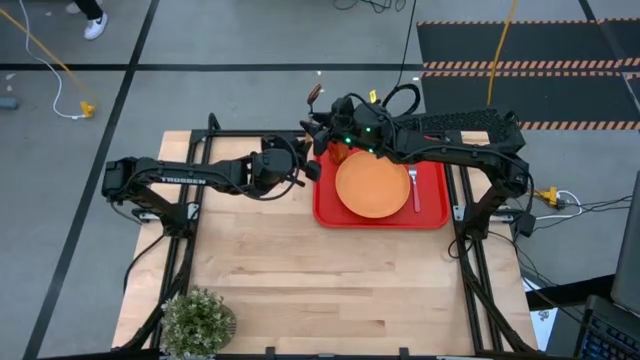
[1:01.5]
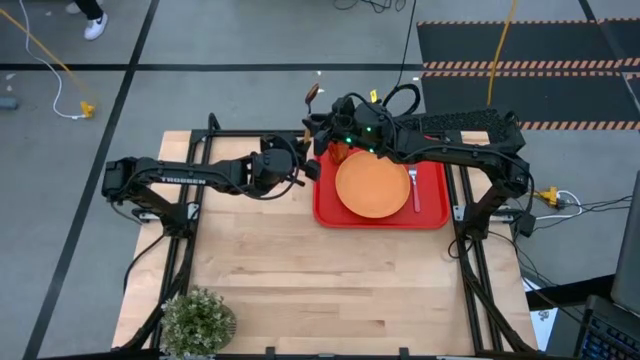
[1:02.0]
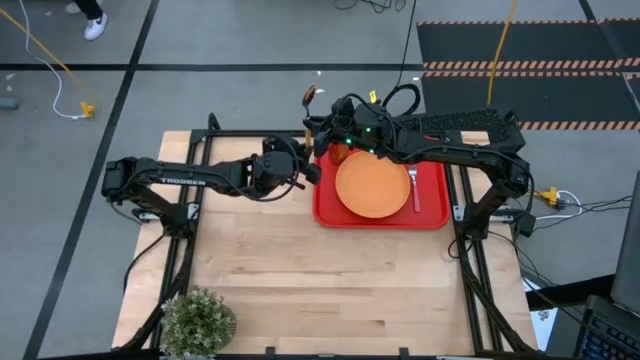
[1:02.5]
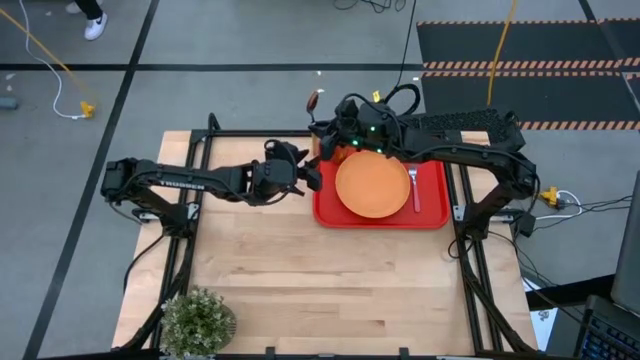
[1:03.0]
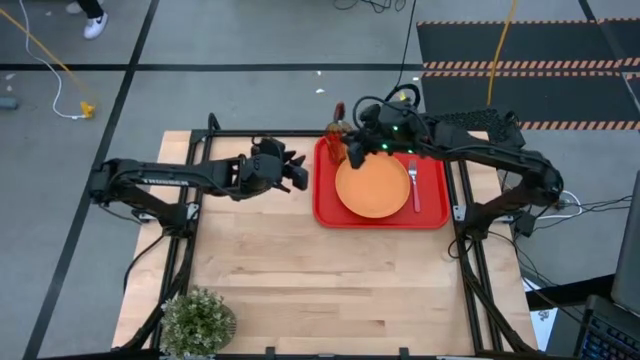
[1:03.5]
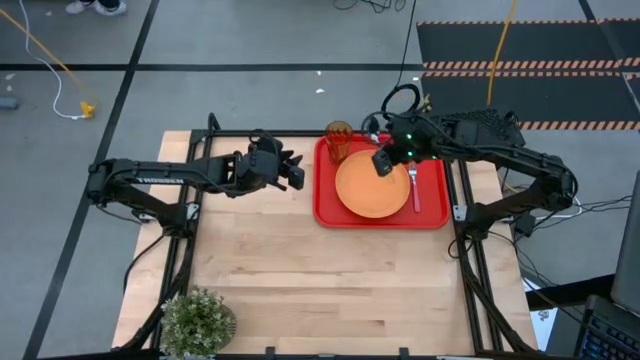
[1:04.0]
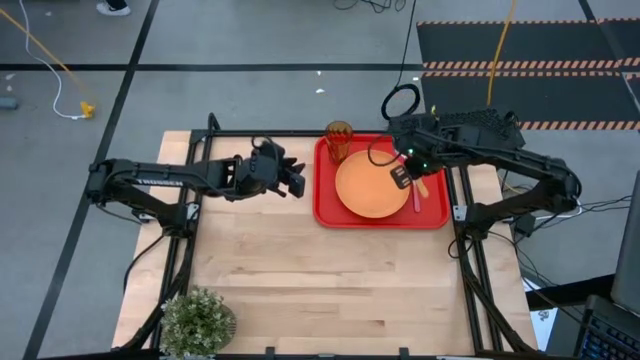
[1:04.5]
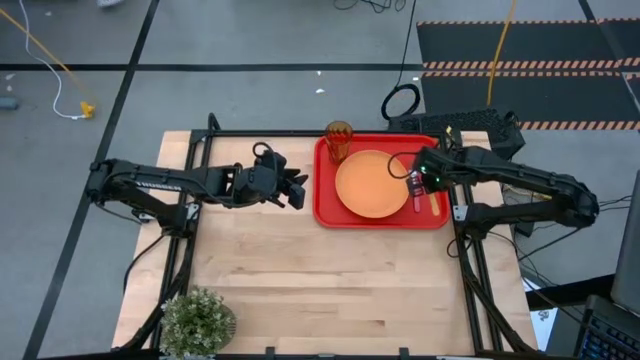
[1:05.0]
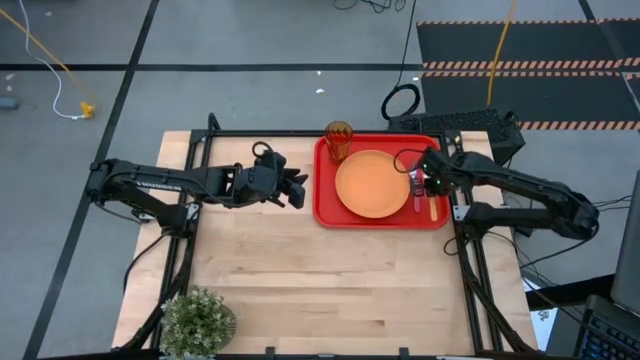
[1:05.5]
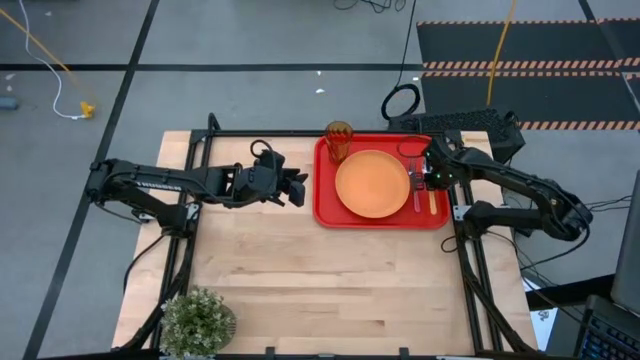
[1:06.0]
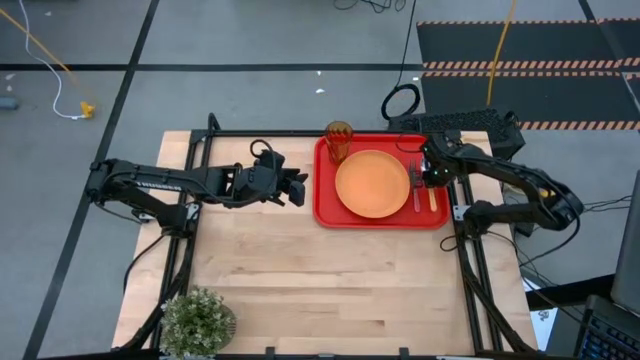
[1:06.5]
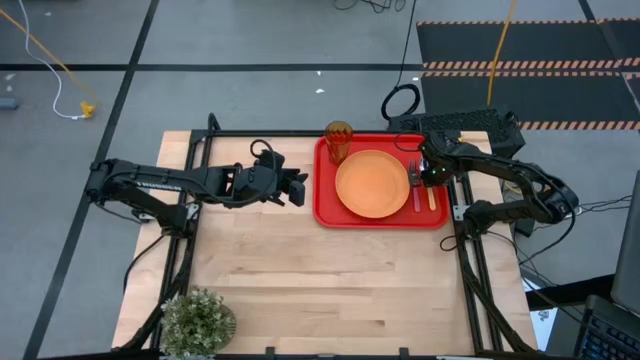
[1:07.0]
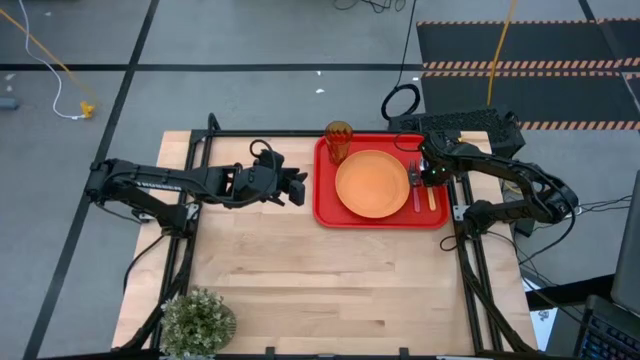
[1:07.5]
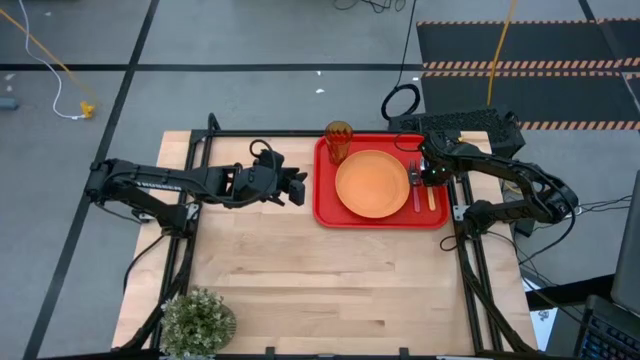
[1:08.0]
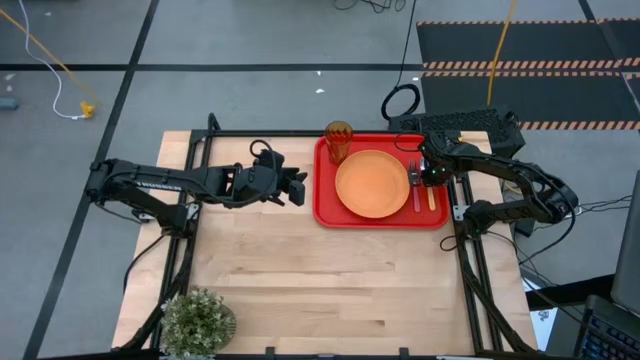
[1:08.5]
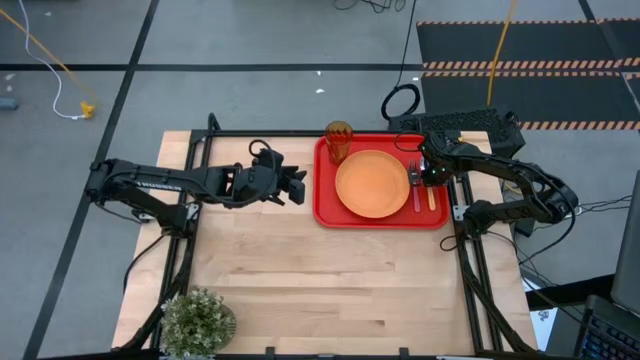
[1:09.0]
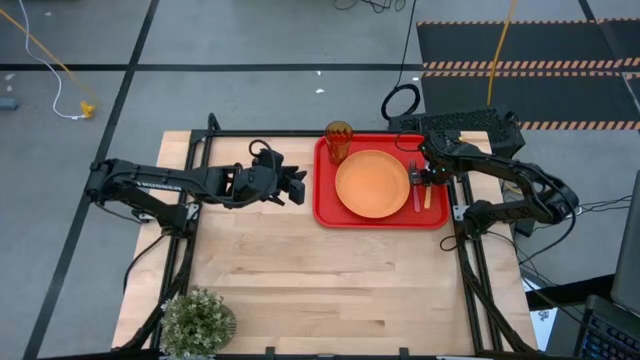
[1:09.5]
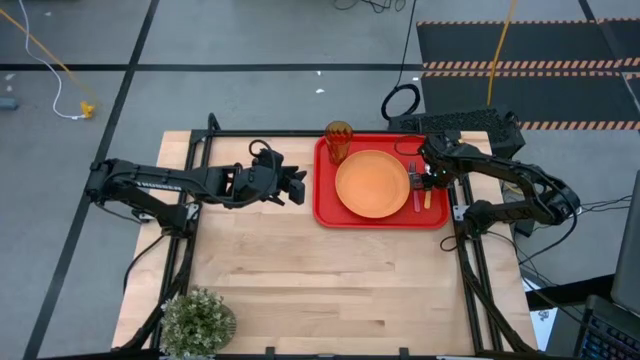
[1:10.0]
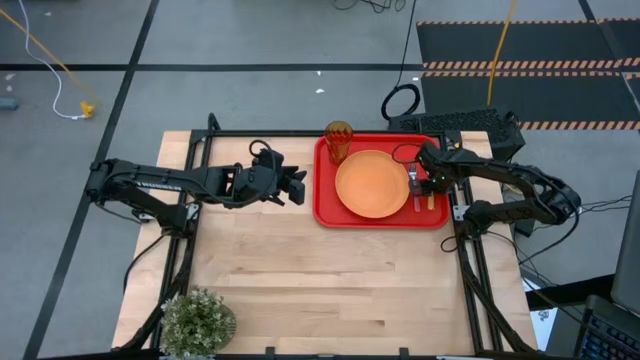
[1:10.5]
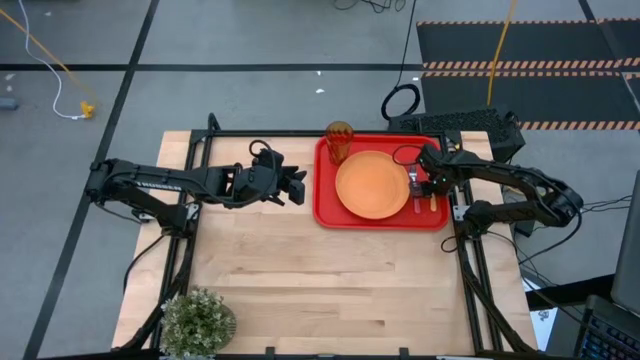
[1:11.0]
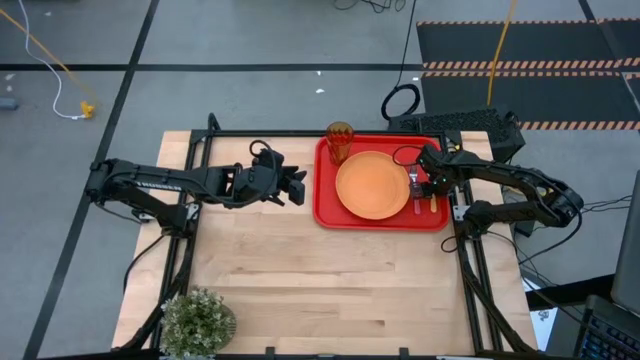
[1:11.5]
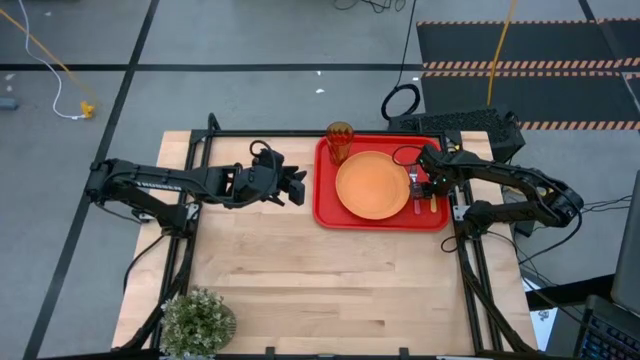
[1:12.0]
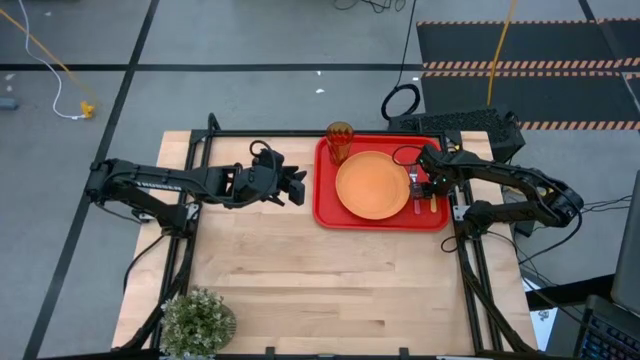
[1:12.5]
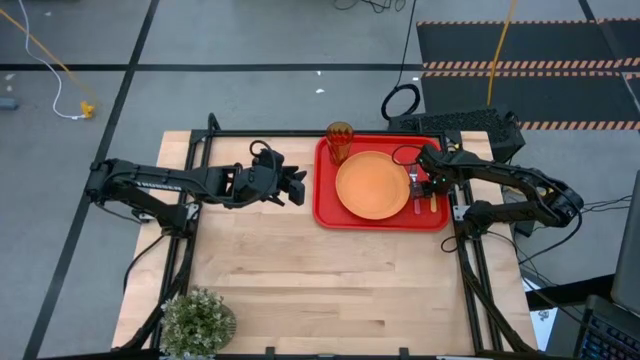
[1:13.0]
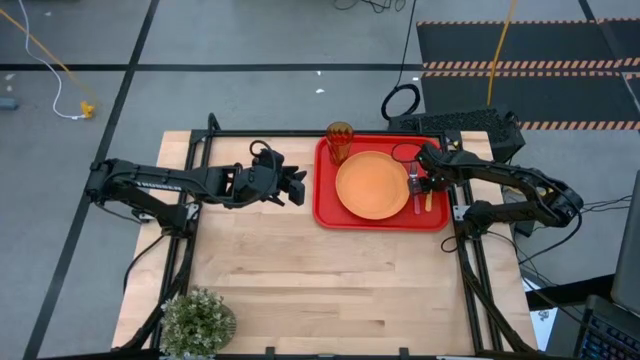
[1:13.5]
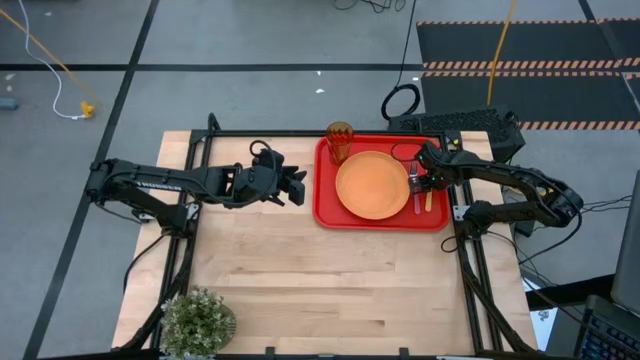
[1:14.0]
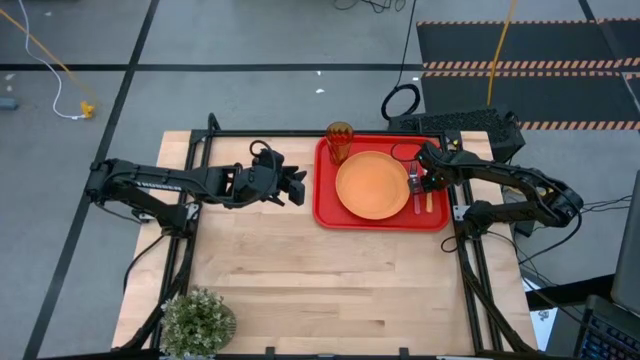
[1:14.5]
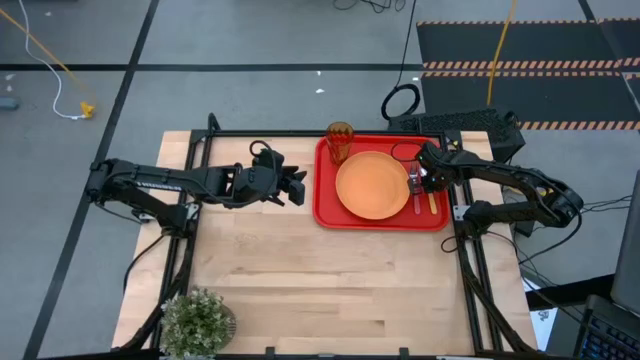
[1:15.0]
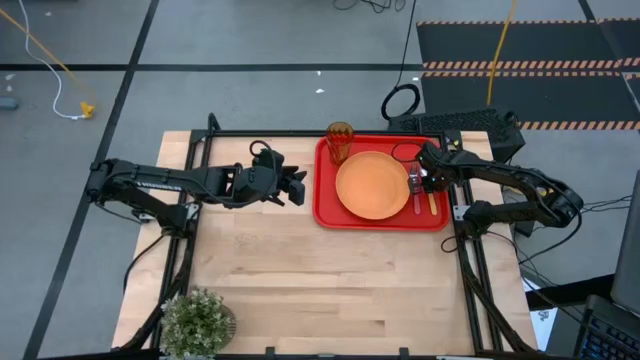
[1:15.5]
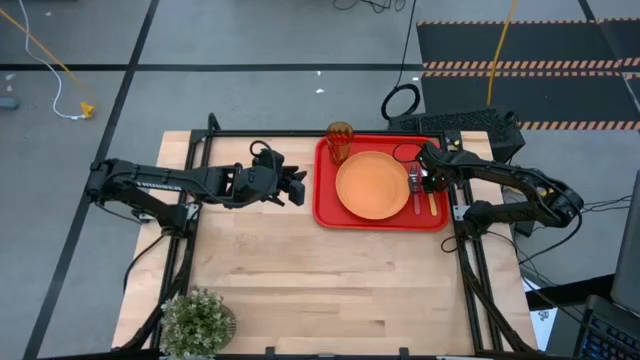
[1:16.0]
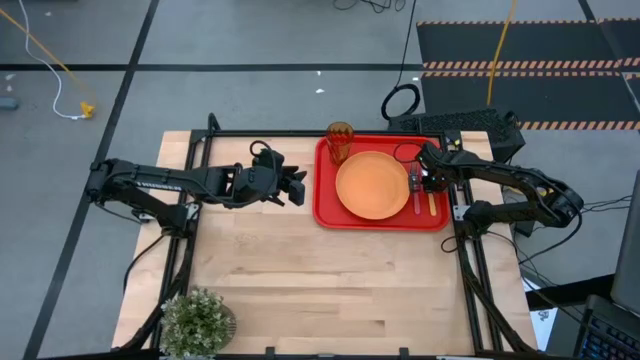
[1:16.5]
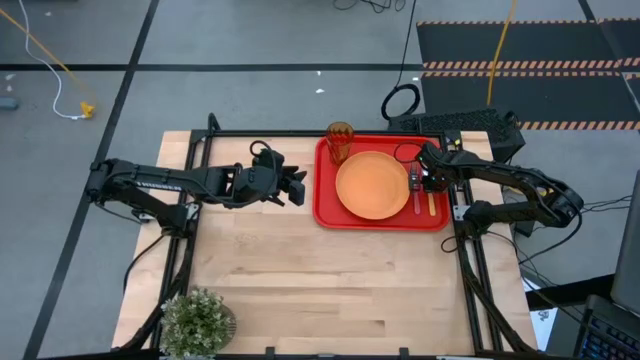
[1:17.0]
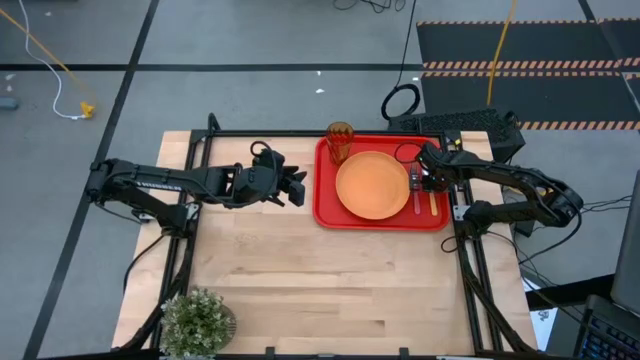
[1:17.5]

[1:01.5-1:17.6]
Task: Pick and place plate/cup/fork/spoon on tray
Put the yellow spoon on the red tray to the right side of the pink fork

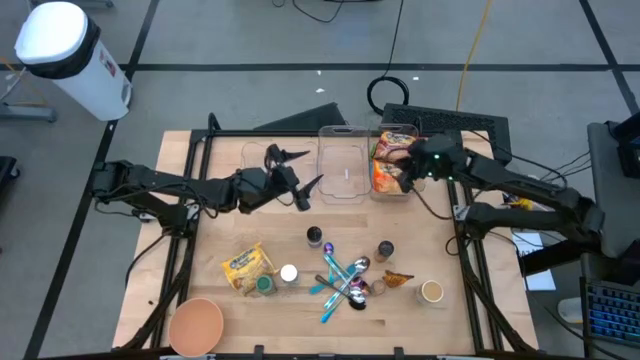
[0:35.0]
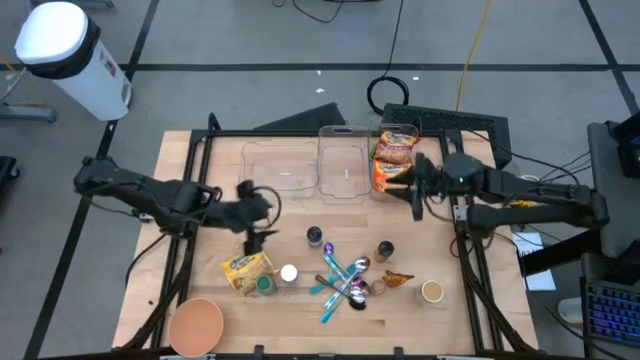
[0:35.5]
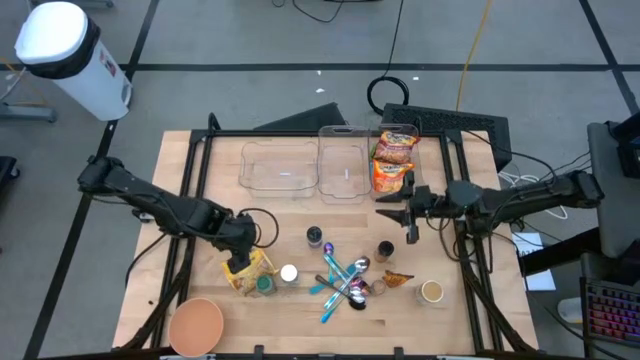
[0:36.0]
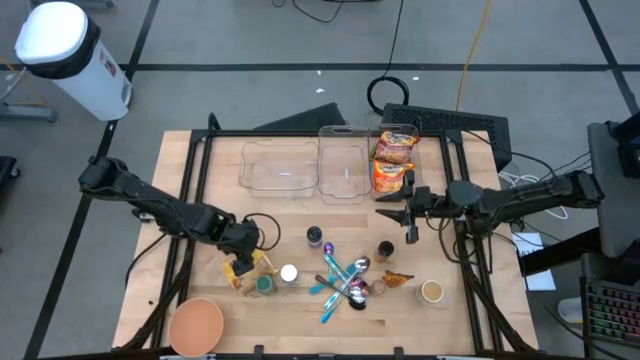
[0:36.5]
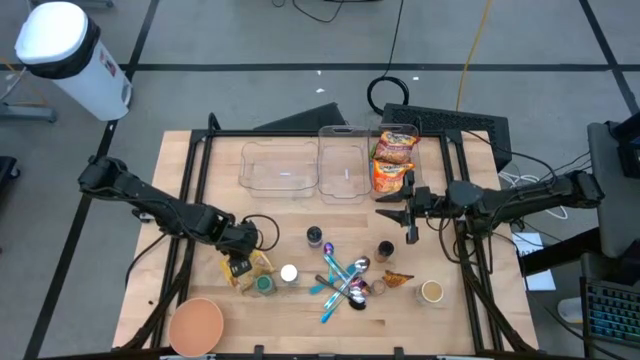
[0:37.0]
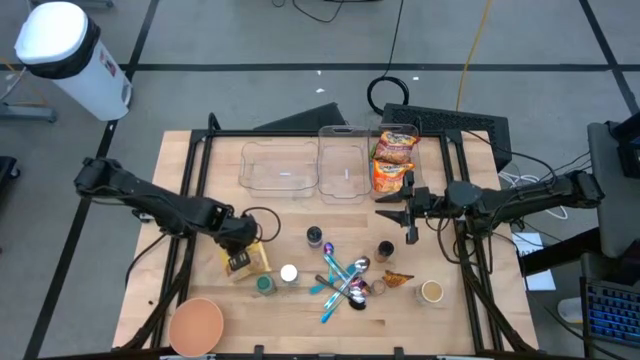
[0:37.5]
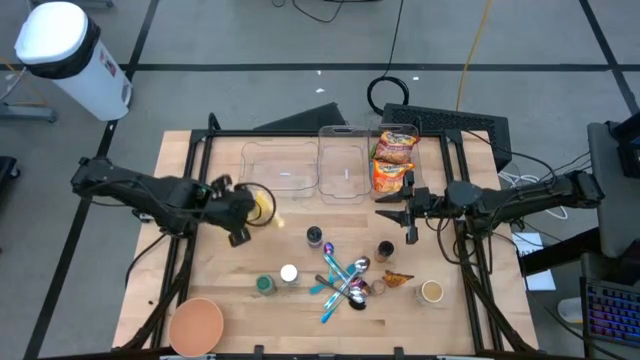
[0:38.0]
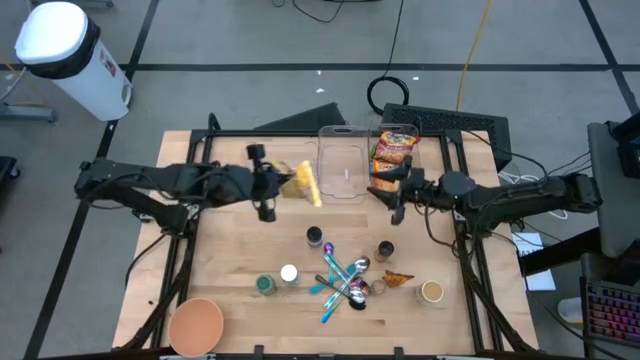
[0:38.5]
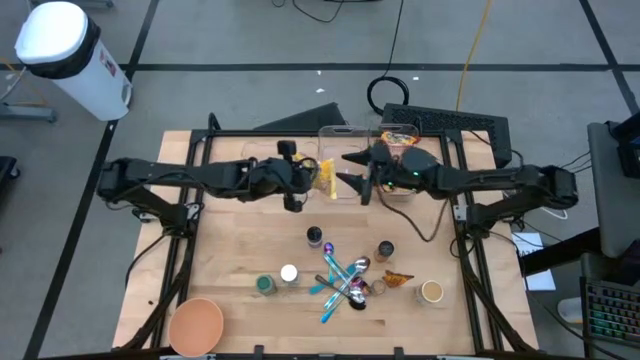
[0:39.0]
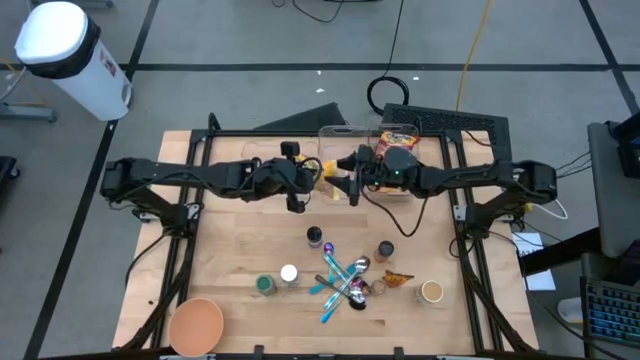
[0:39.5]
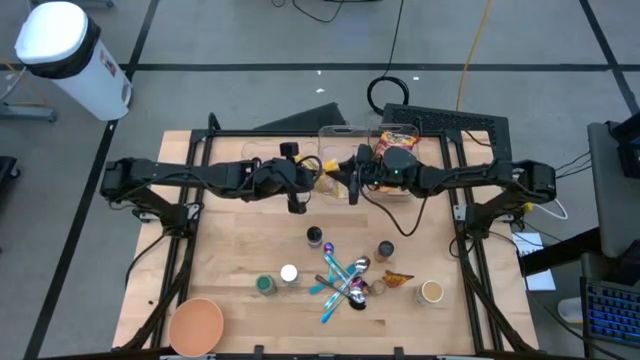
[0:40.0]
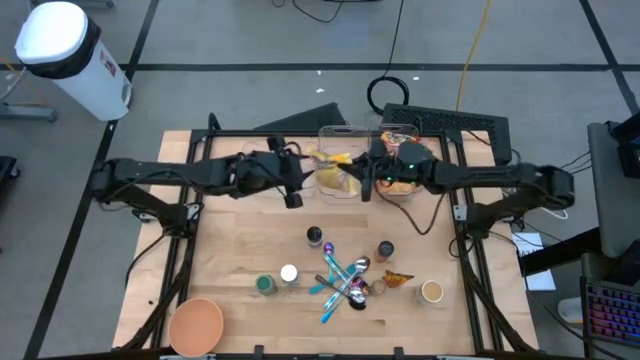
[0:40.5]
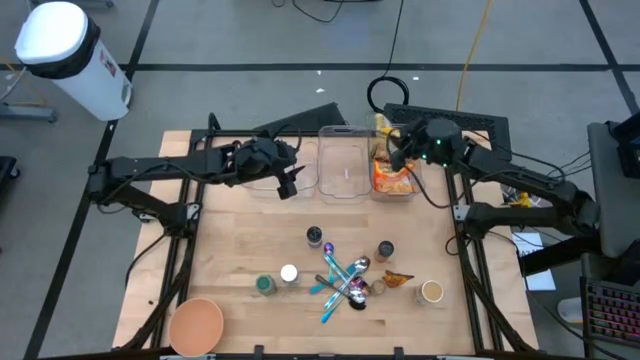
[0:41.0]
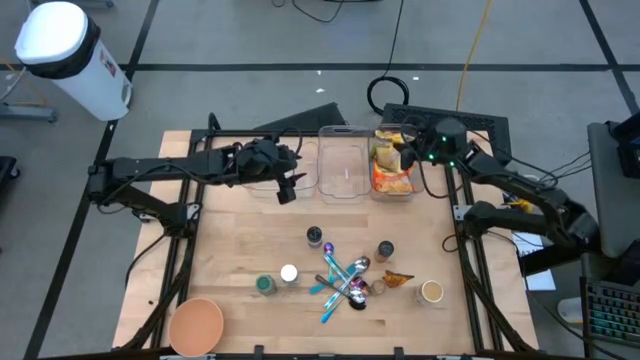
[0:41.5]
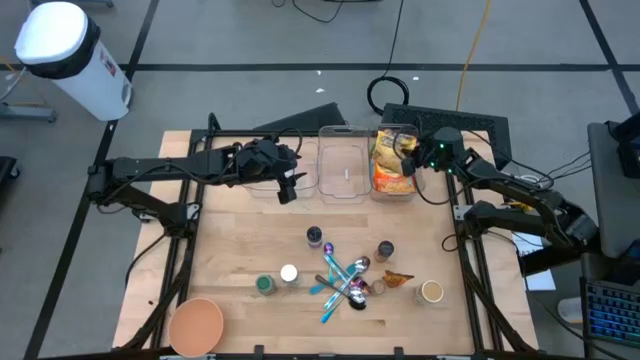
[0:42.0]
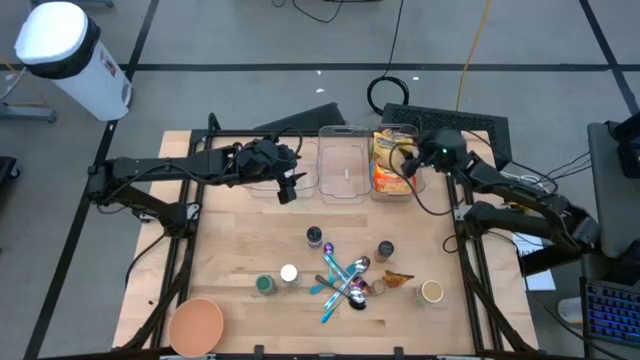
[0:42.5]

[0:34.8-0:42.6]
Task: Pick & Place Food Item
Put the yellow noodle pack into the right transparent bin
